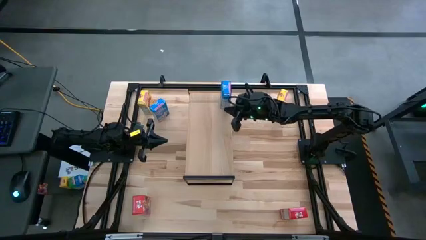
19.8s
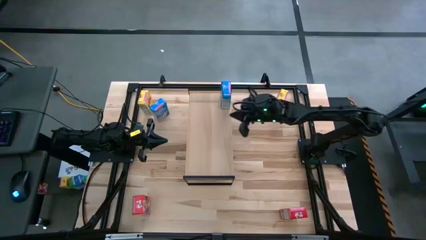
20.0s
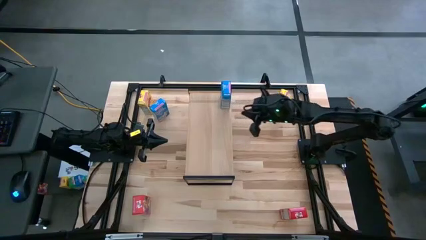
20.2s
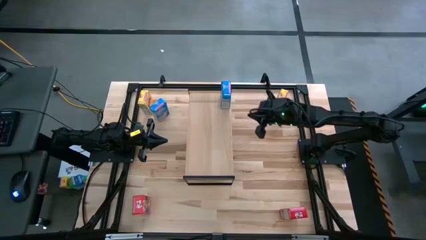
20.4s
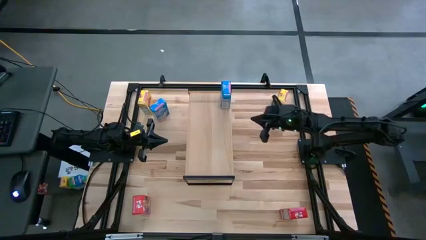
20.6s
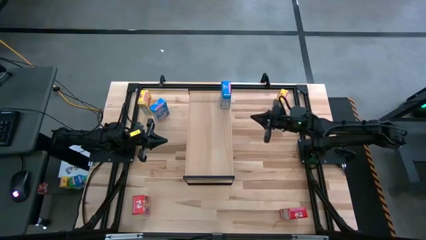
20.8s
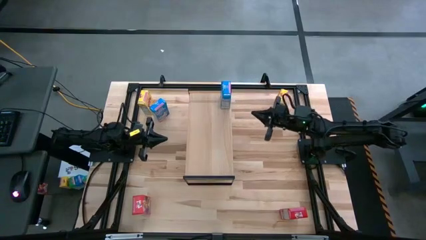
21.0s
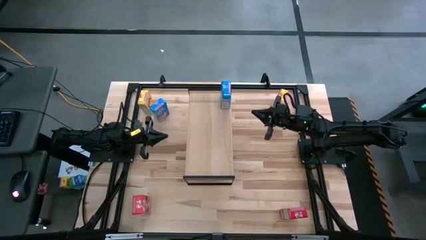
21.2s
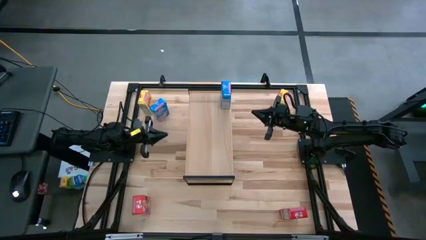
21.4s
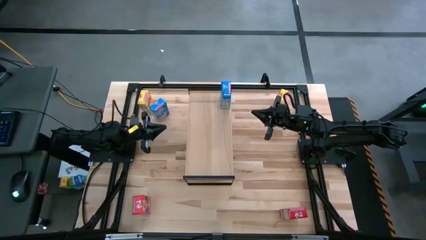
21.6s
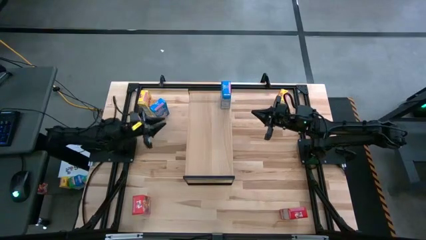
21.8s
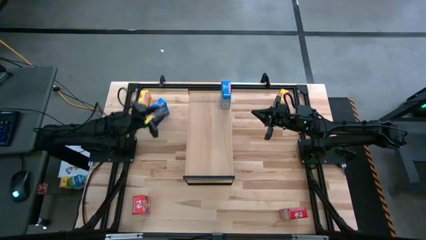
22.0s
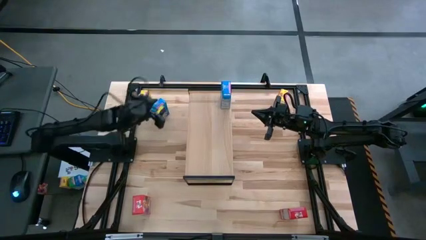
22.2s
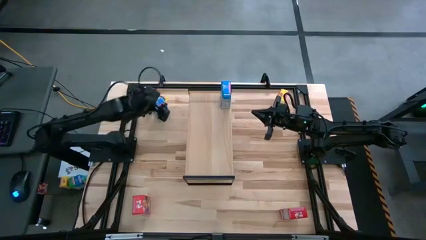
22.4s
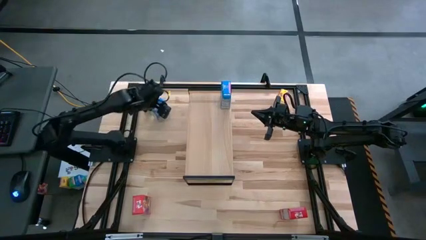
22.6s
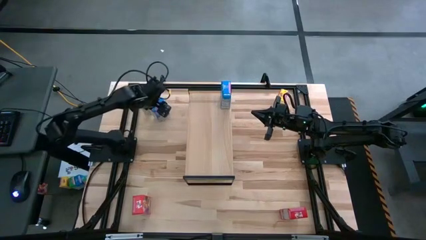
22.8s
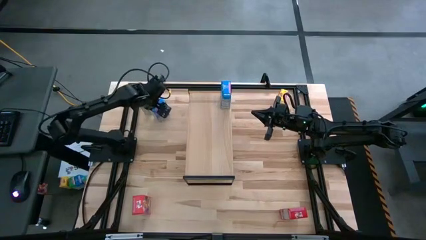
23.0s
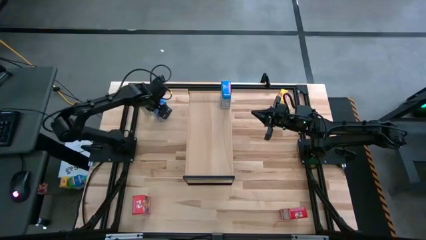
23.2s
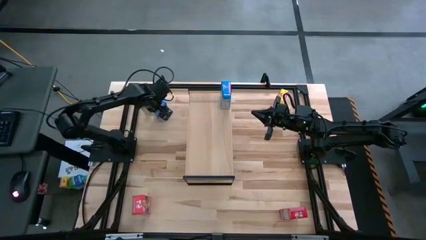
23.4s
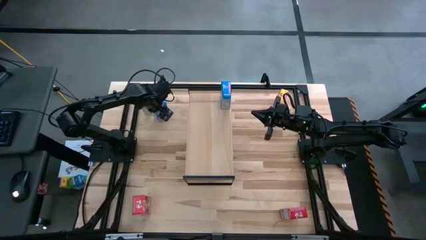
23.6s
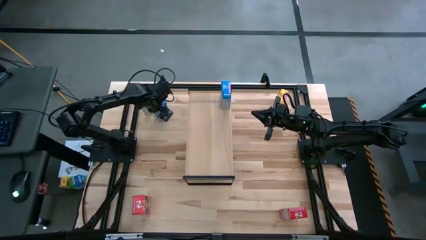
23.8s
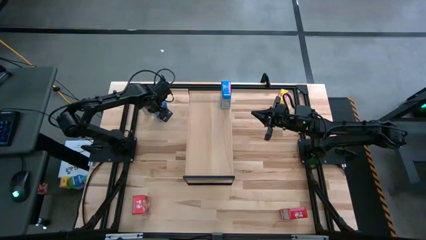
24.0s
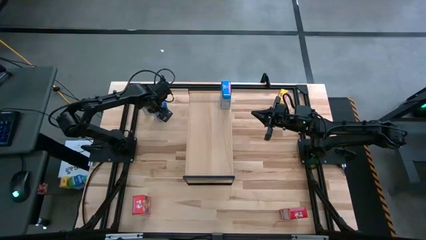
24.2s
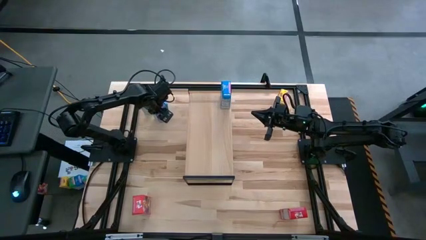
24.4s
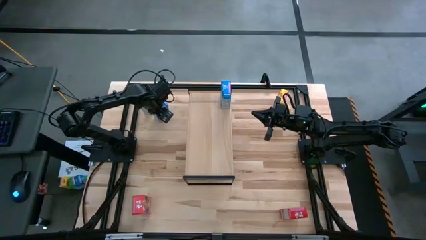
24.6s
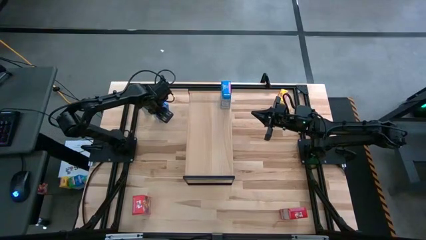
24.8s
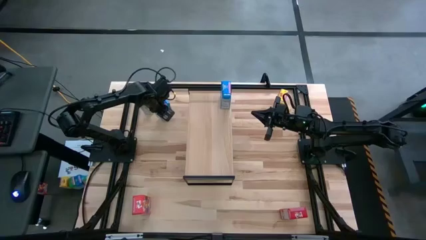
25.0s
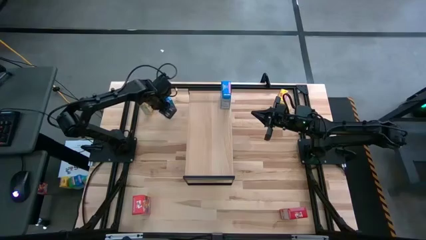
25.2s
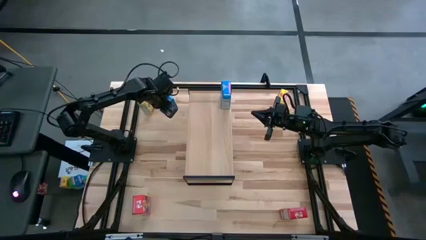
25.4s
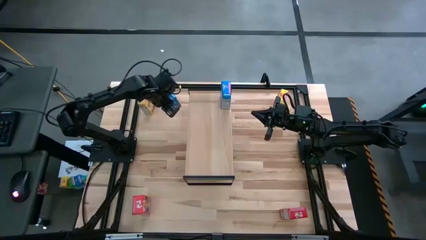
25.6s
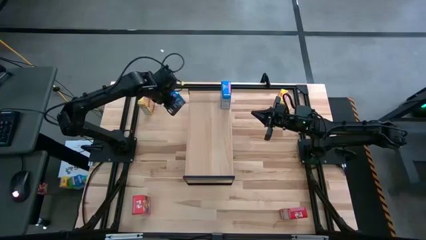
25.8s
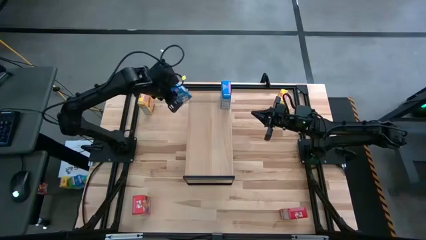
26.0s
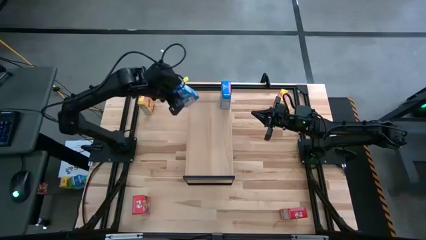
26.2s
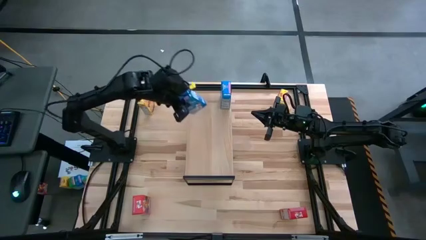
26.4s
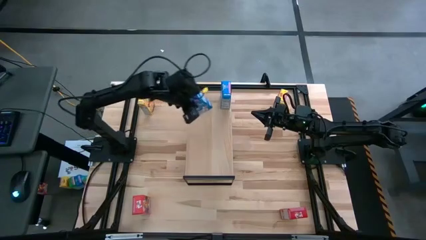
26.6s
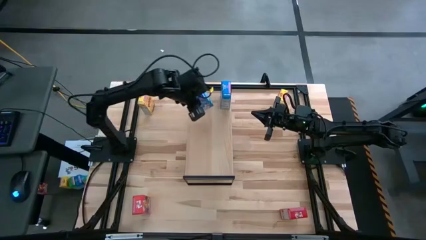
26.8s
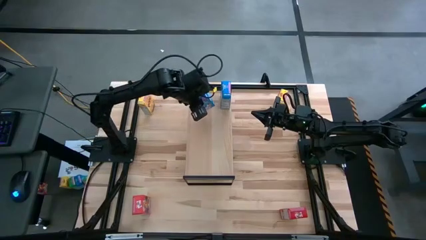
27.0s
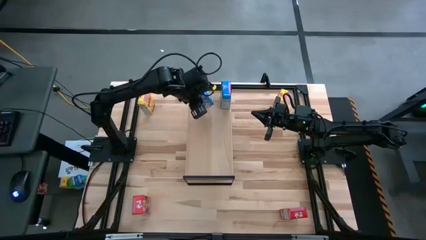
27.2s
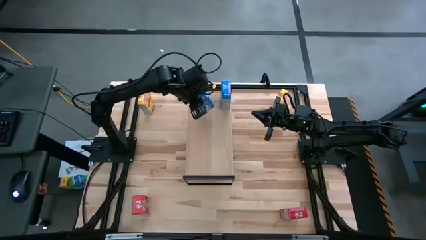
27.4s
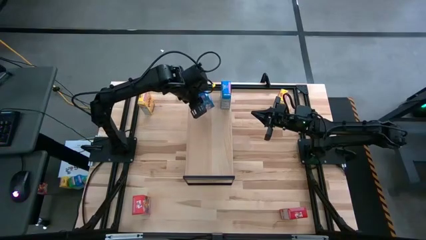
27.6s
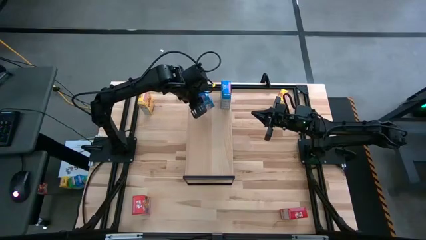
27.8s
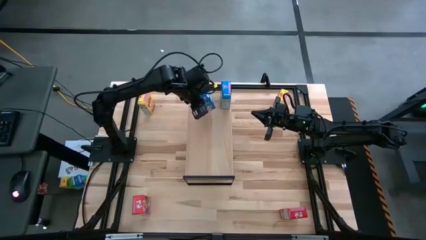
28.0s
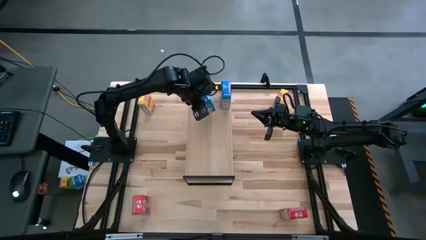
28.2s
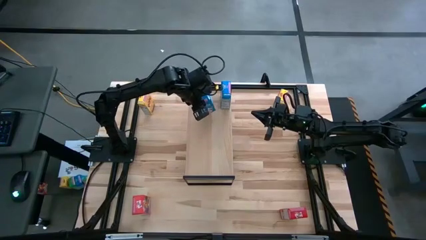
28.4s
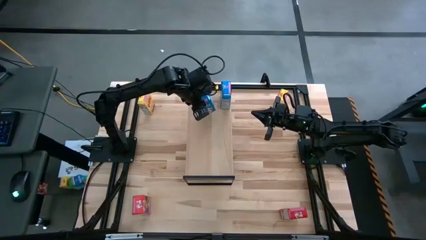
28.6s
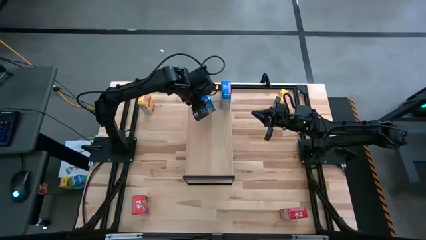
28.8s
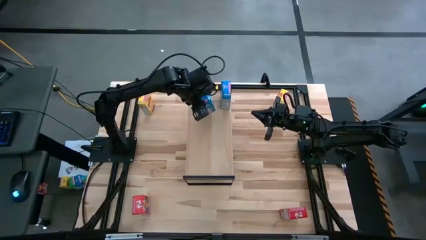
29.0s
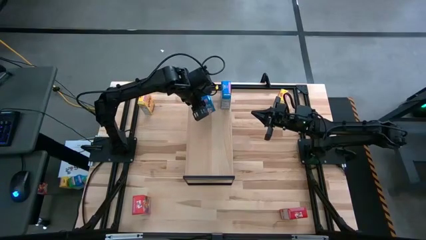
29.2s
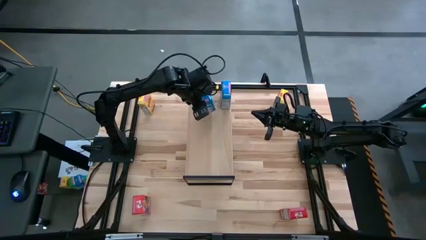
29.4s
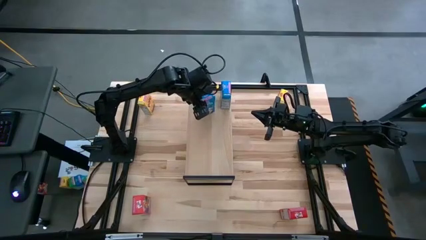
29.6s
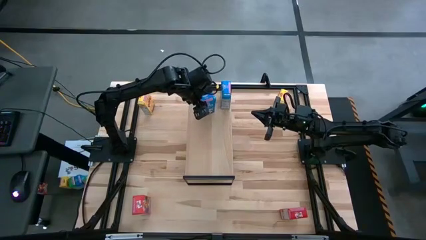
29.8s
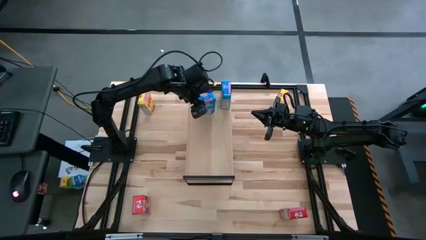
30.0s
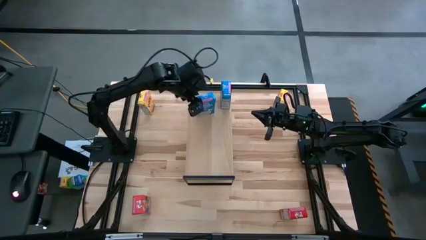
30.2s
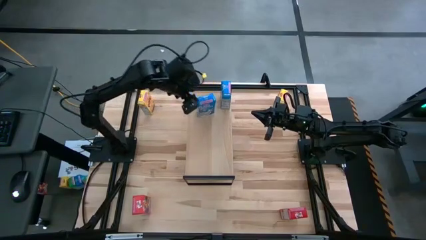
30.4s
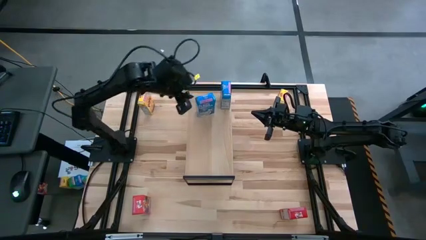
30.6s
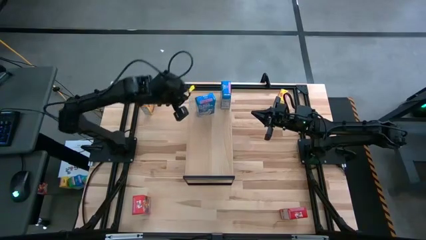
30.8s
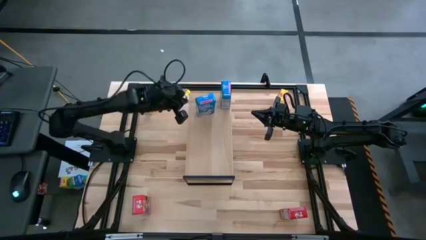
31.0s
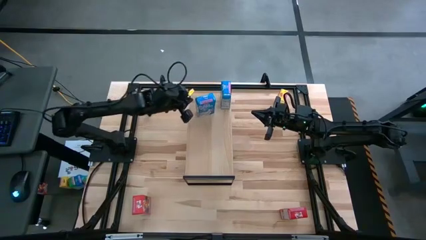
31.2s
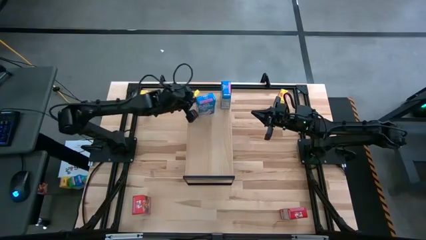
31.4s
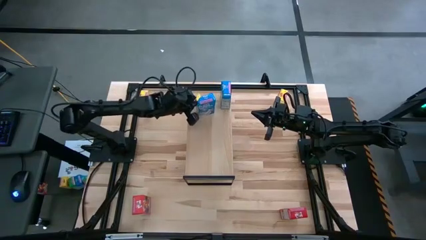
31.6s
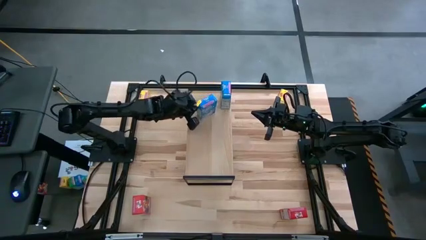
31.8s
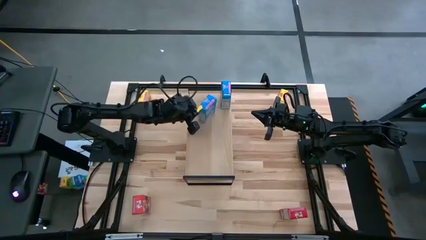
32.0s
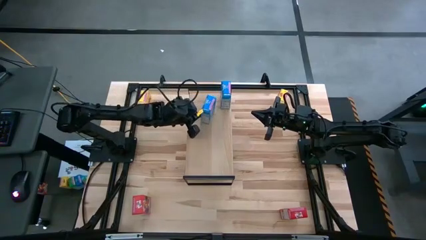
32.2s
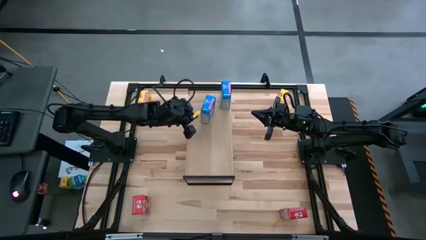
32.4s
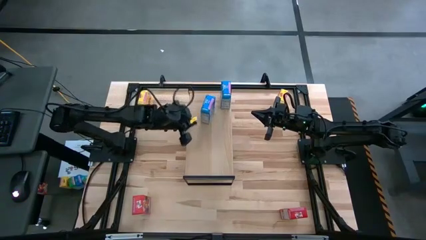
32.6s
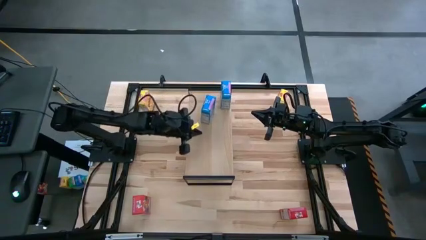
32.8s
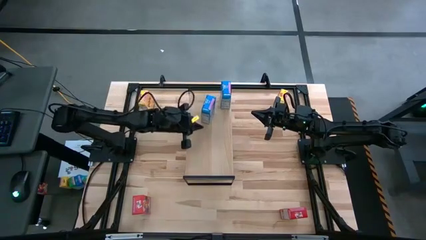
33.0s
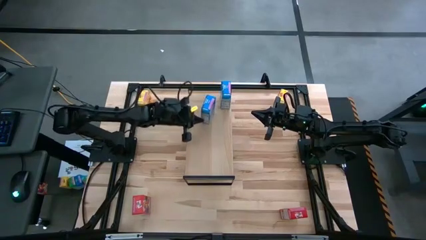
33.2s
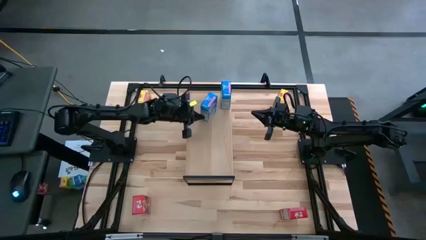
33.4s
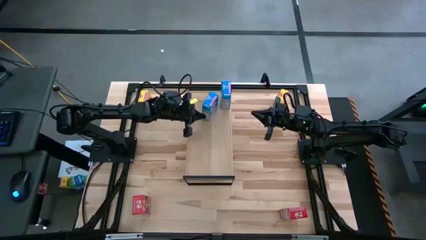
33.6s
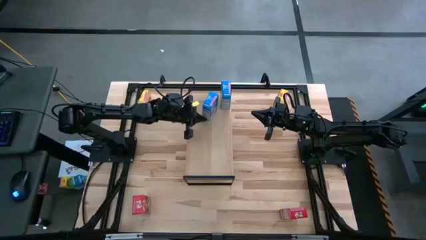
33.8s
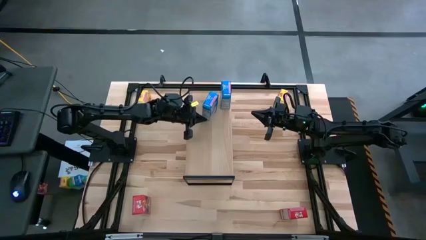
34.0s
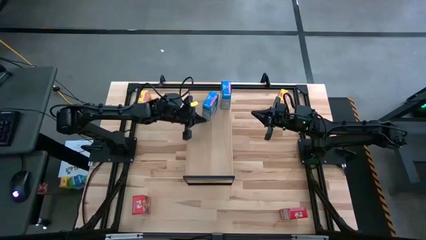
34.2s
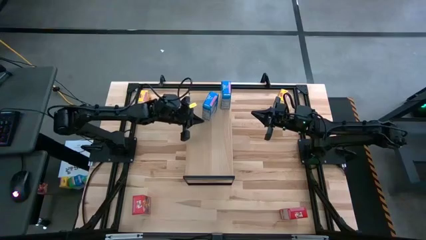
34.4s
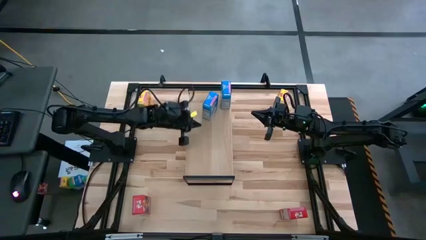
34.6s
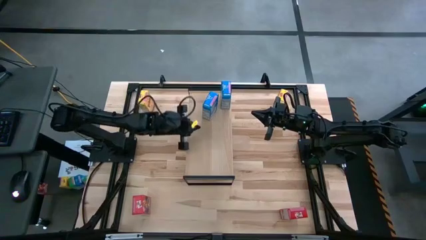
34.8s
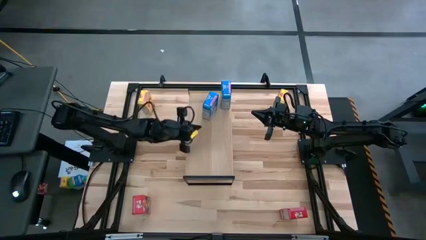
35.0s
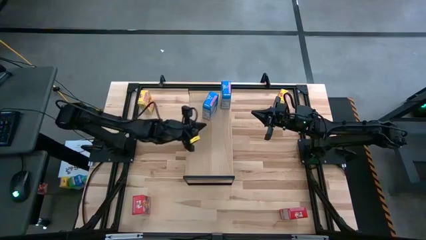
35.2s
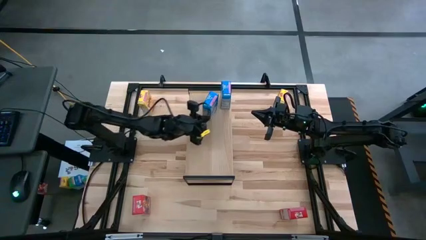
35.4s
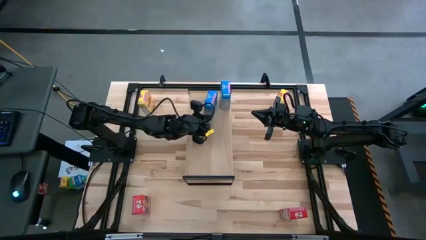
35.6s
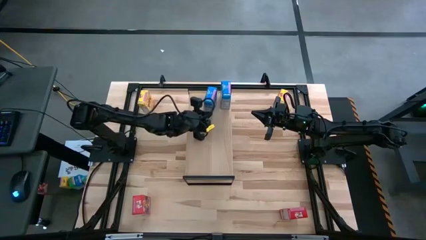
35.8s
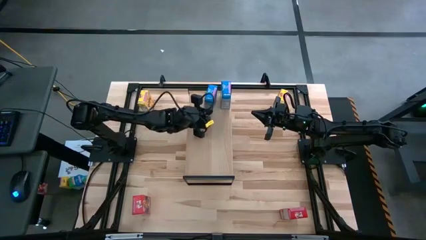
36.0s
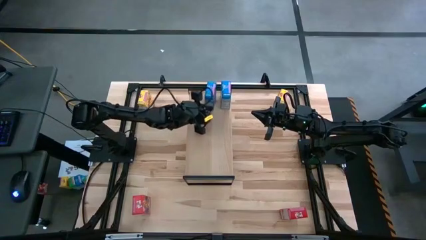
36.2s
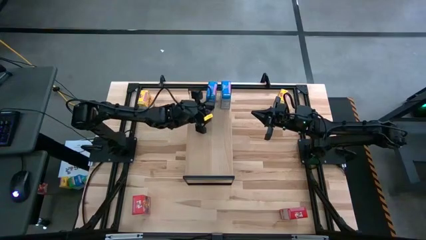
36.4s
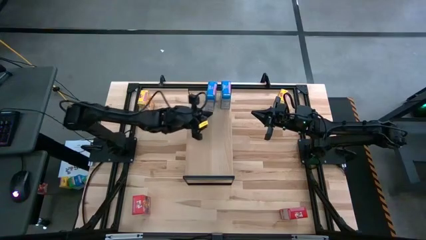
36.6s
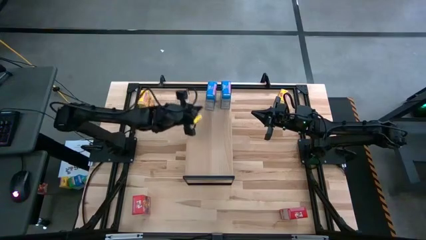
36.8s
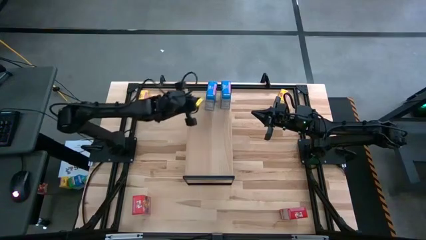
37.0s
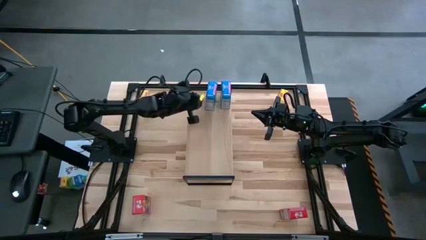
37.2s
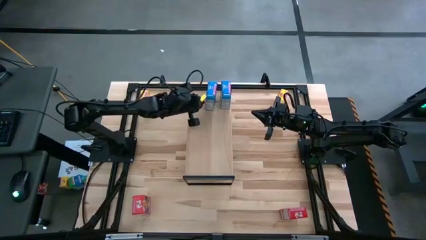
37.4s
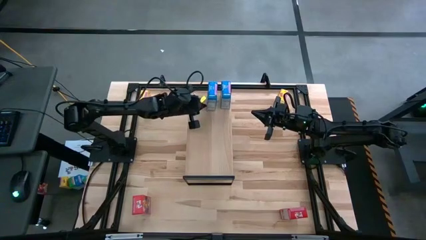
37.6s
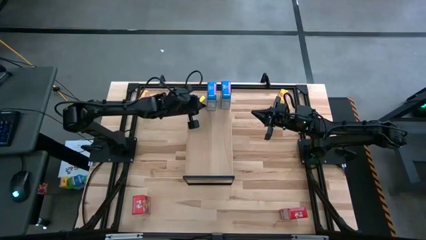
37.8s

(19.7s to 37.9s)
Task: Stack cereal on shelf
Put the blue cereal box on the shelf
